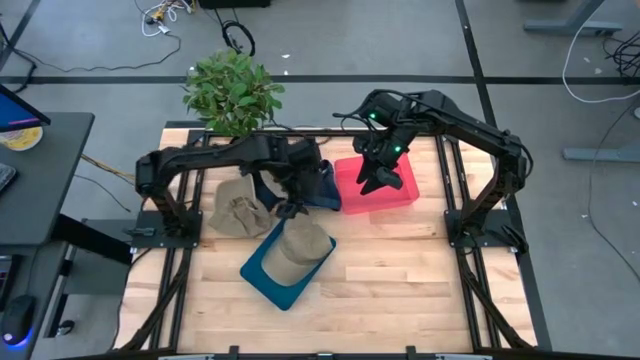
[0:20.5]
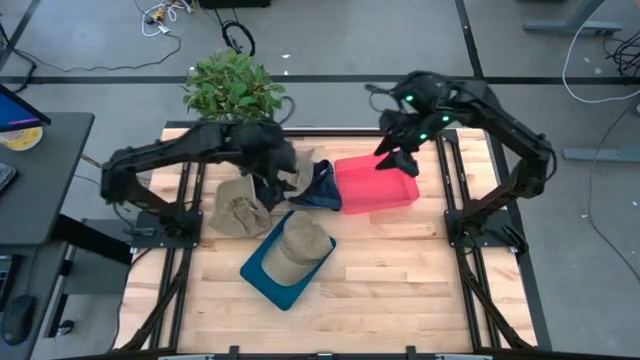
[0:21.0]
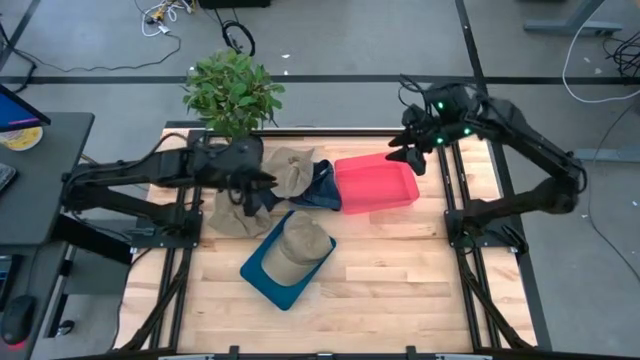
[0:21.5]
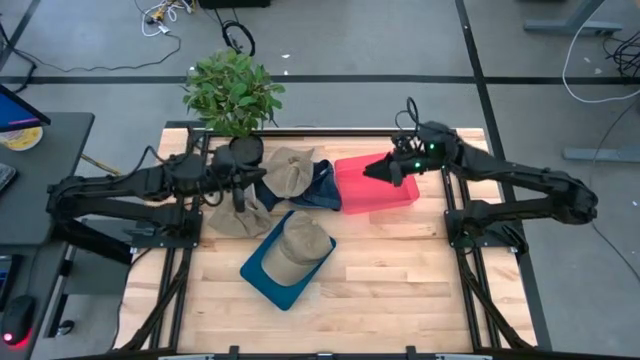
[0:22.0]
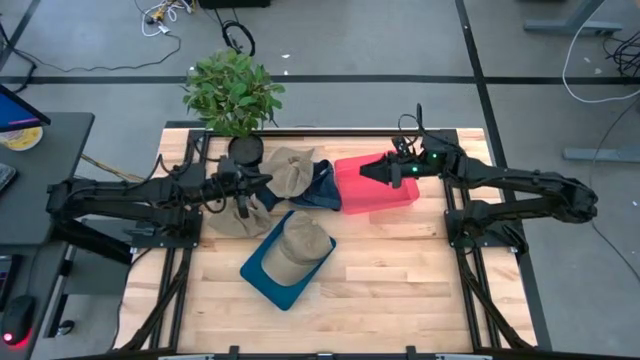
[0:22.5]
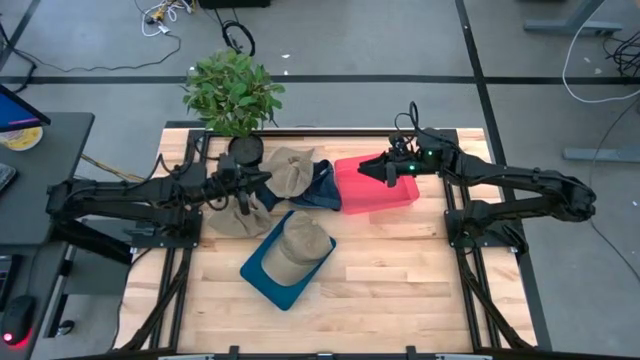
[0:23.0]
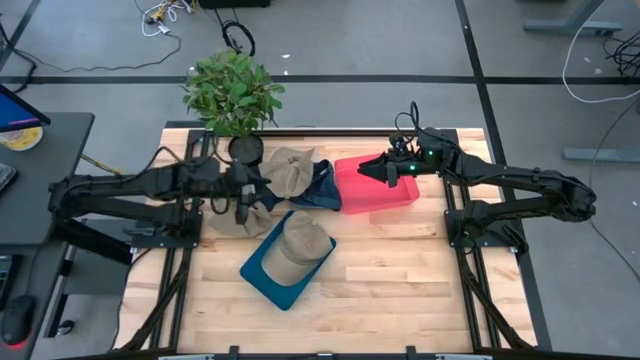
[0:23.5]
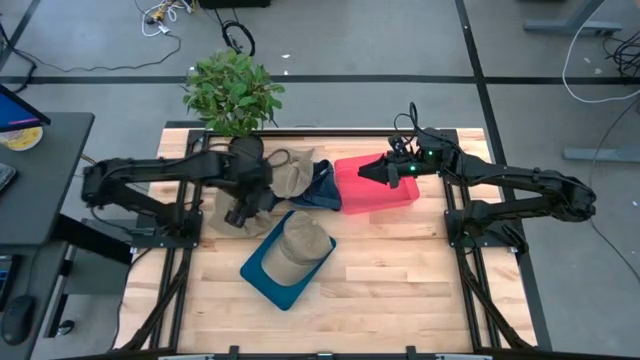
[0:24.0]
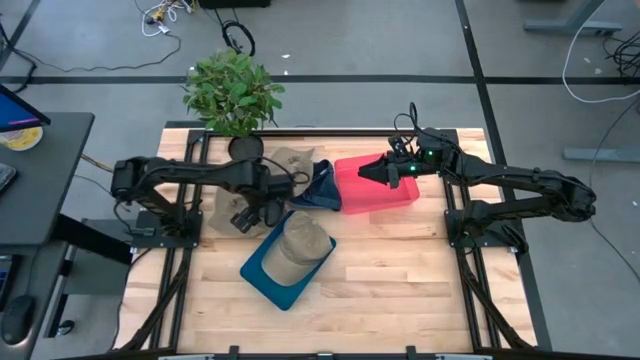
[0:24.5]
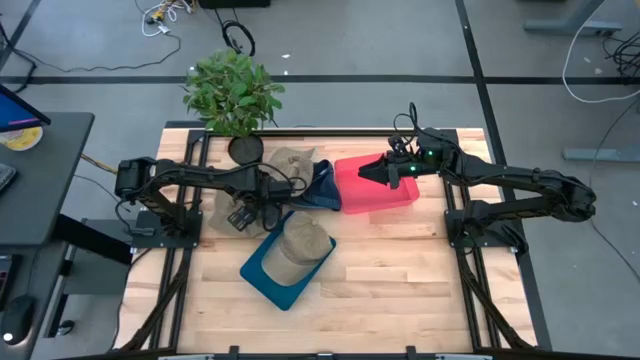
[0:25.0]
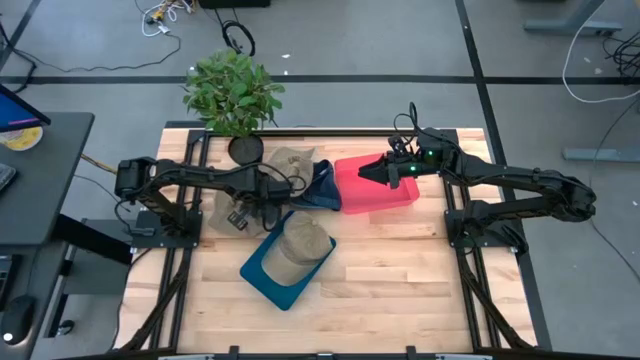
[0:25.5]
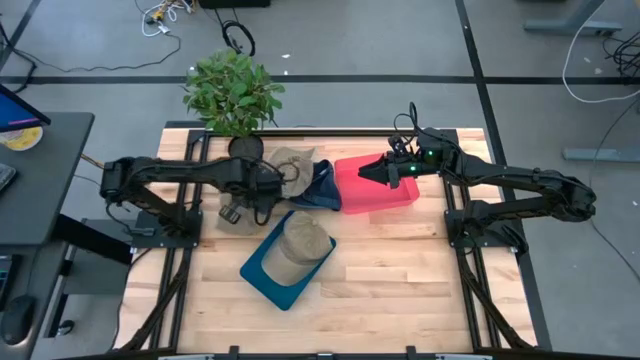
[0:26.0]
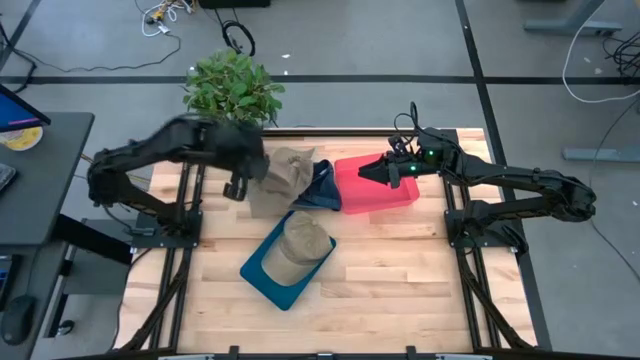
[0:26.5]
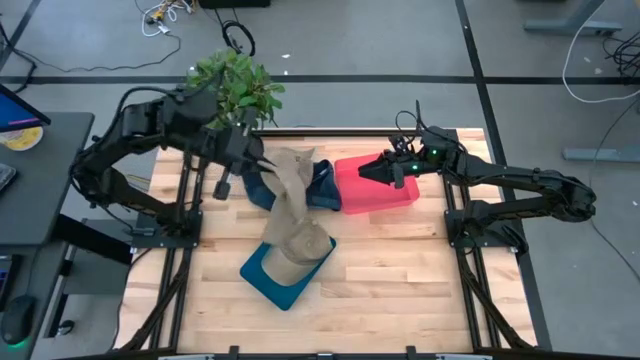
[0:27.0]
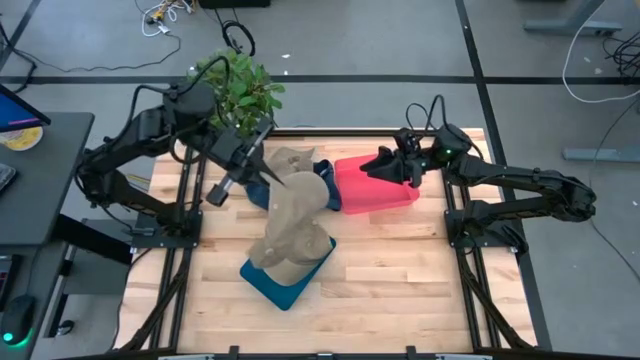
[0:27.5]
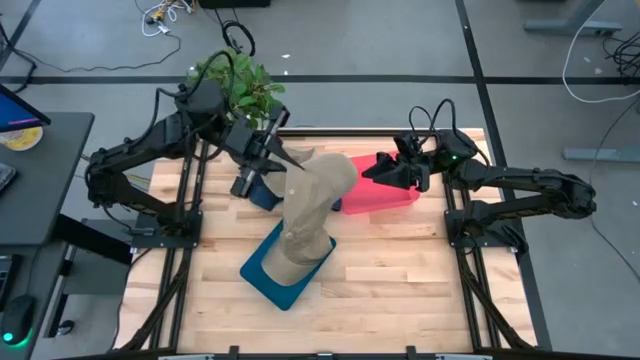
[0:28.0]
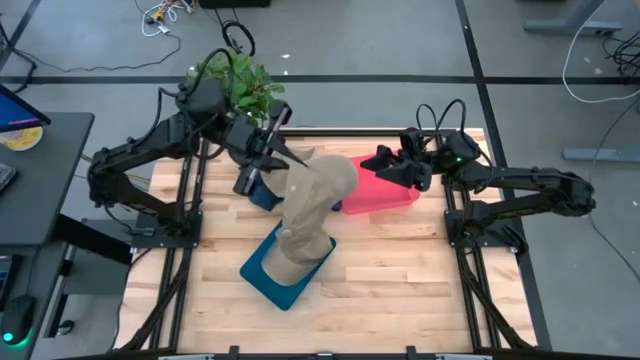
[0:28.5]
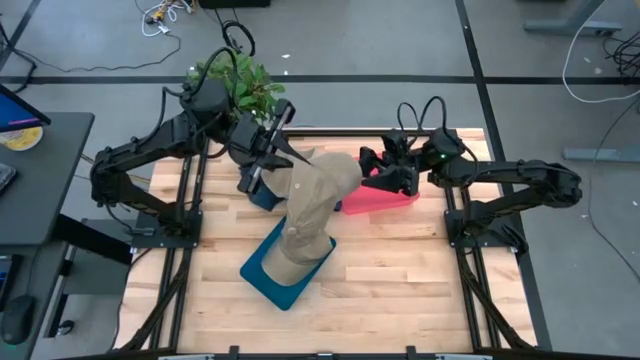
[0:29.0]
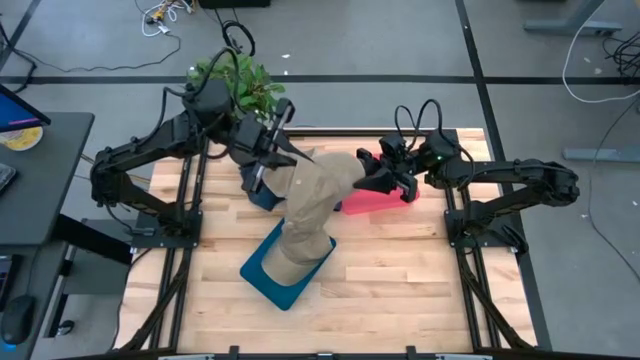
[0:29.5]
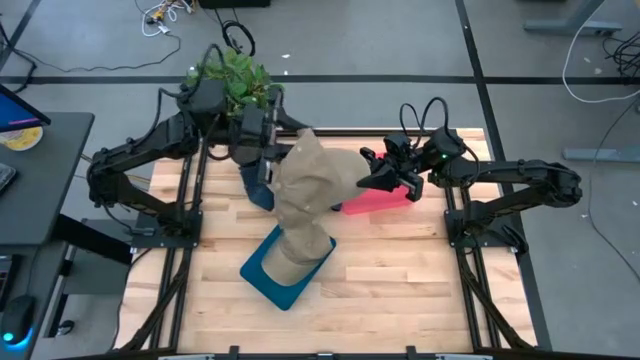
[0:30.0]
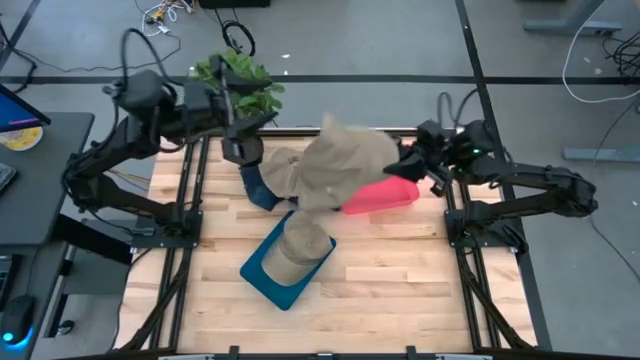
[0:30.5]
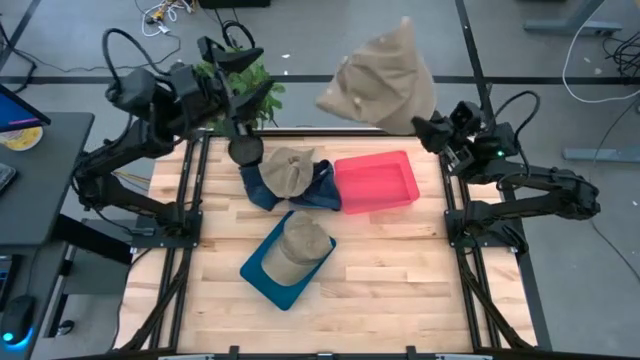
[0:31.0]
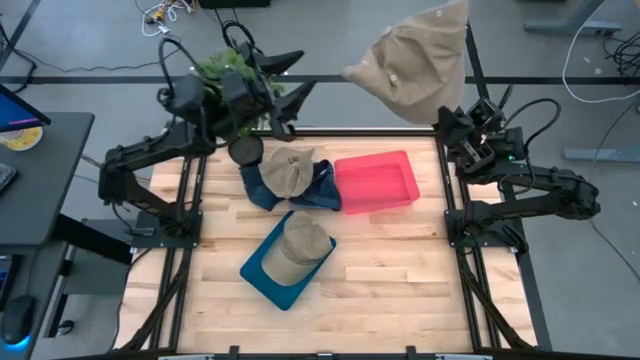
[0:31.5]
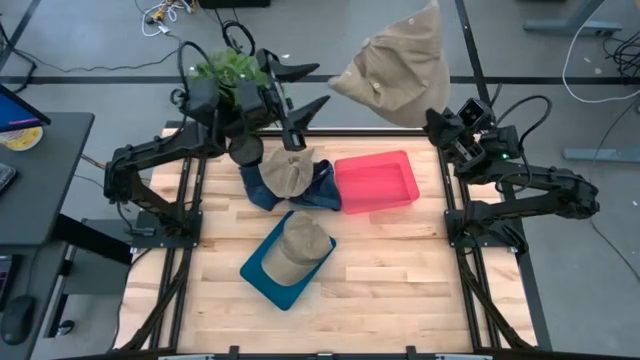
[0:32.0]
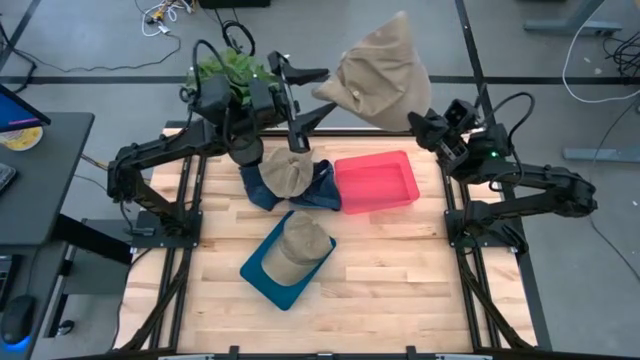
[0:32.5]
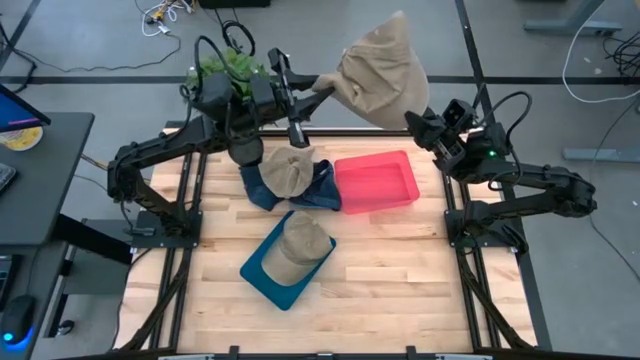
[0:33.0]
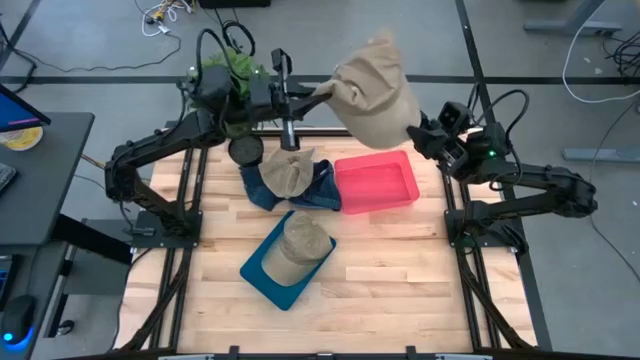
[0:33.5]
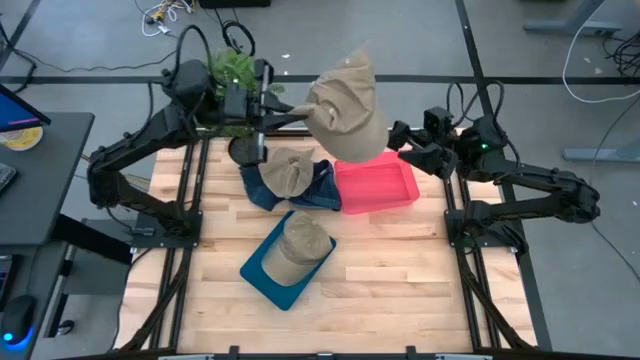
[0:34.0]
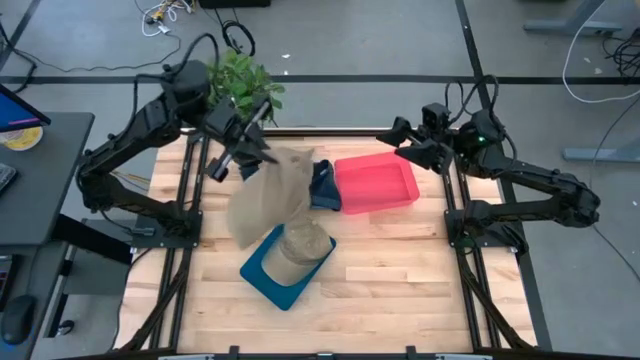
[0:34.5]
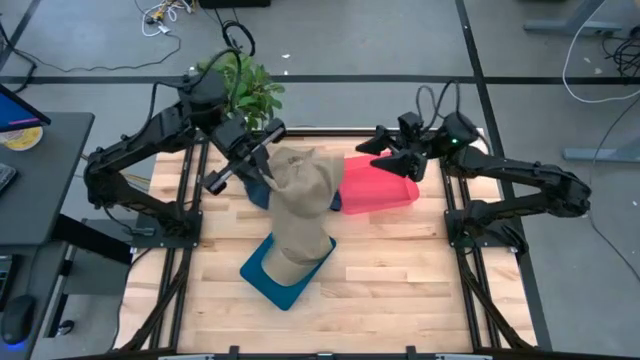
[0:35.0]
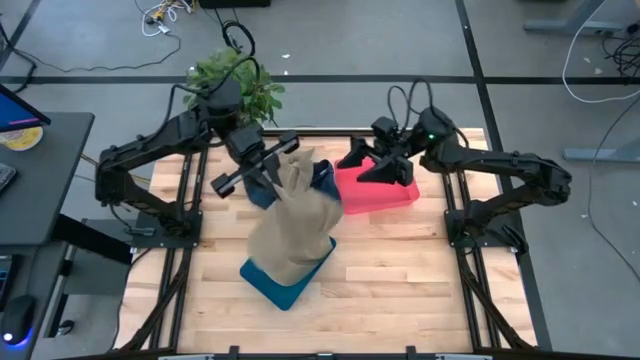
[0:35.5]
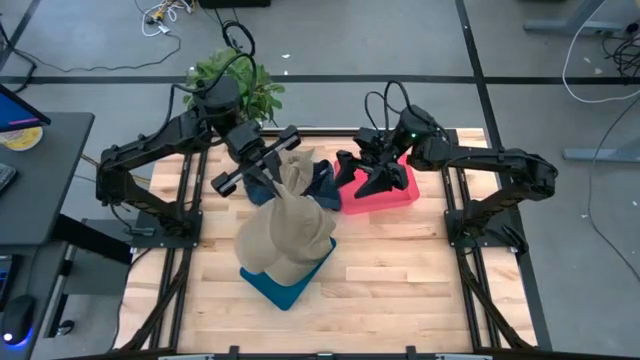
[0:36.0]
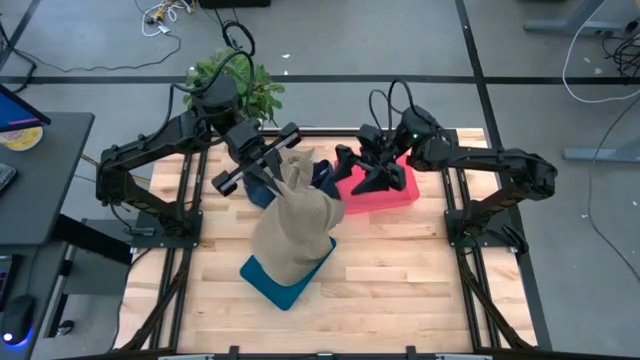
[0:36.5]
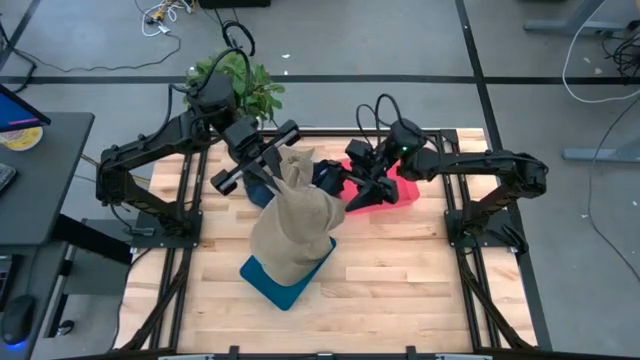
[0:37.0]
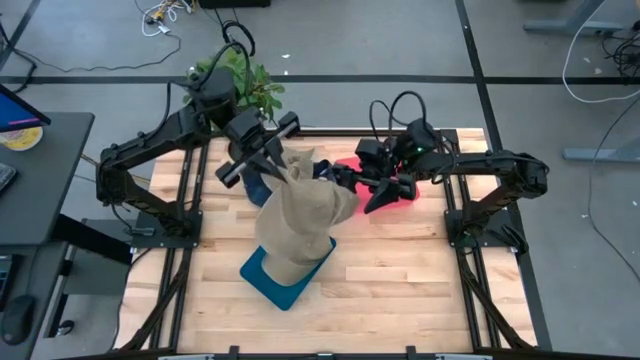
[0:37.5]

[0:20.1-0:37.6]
Task: Pick & Place hat
Put the left brown cap into the blue bin

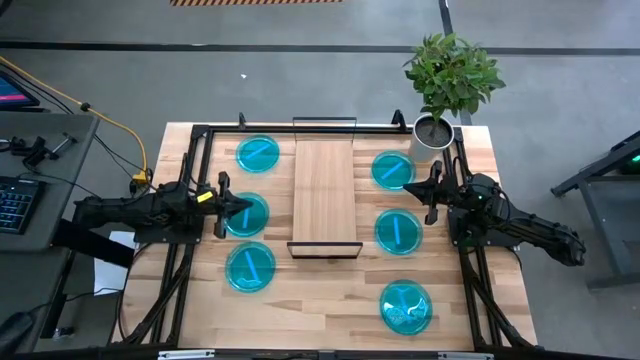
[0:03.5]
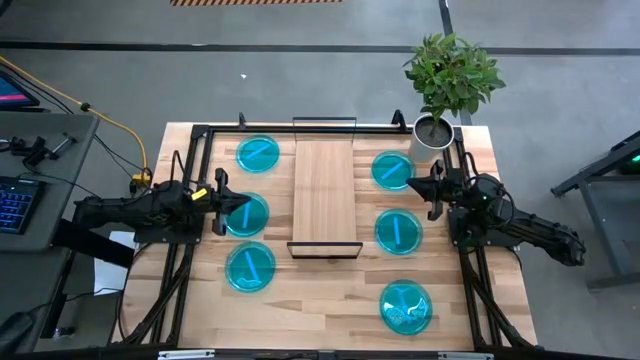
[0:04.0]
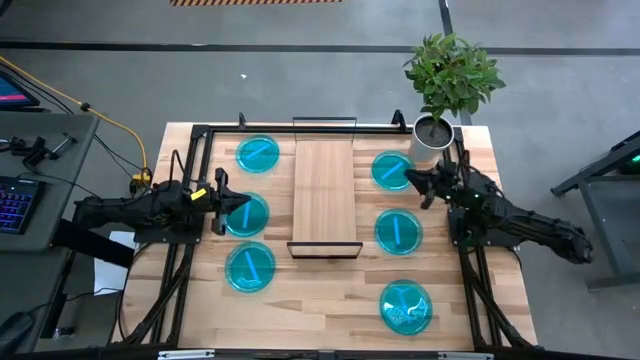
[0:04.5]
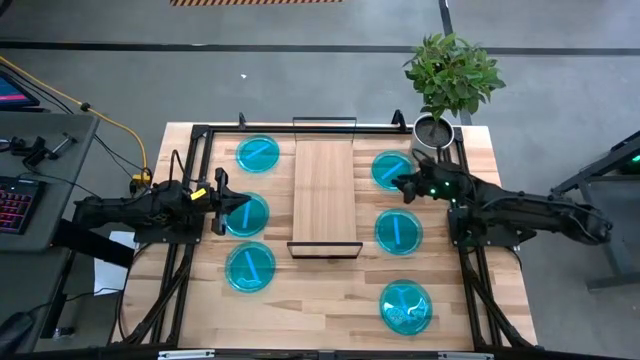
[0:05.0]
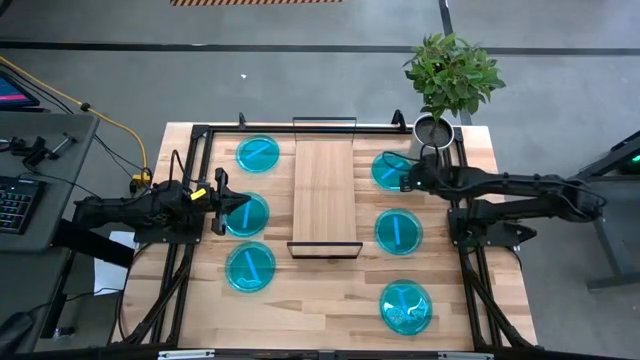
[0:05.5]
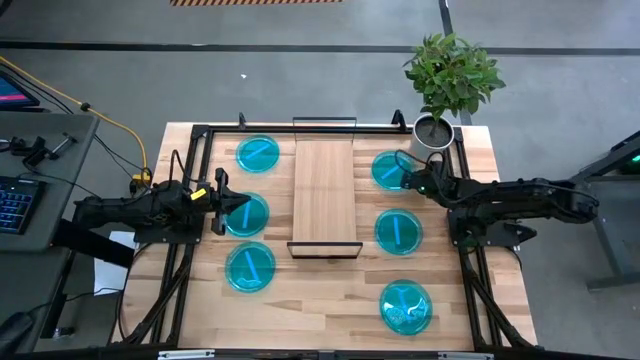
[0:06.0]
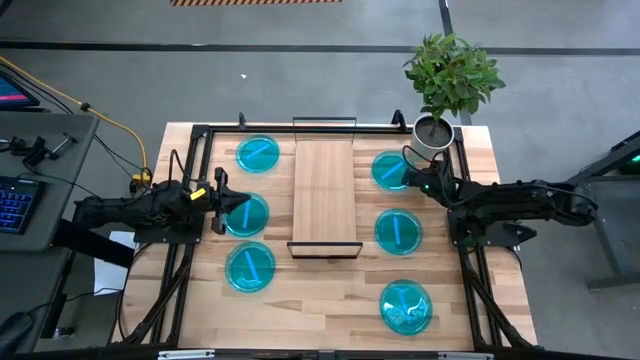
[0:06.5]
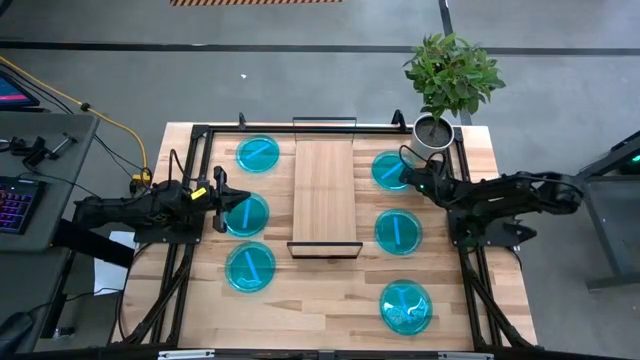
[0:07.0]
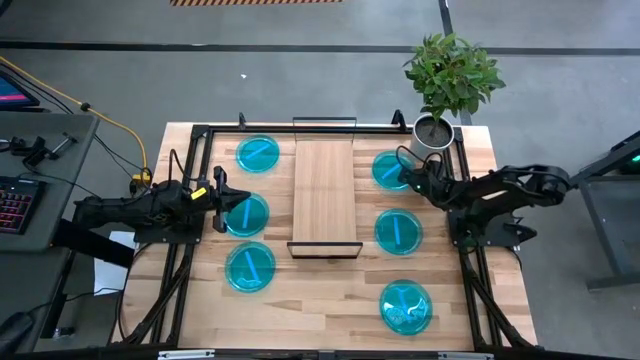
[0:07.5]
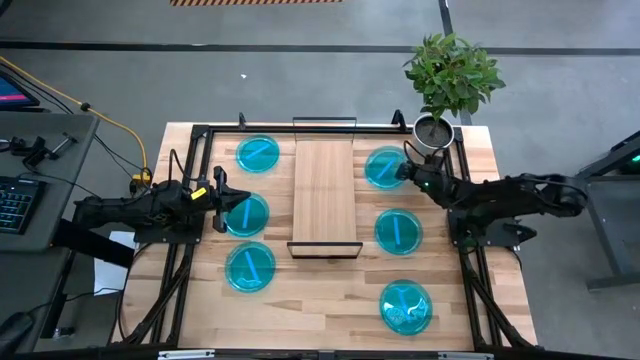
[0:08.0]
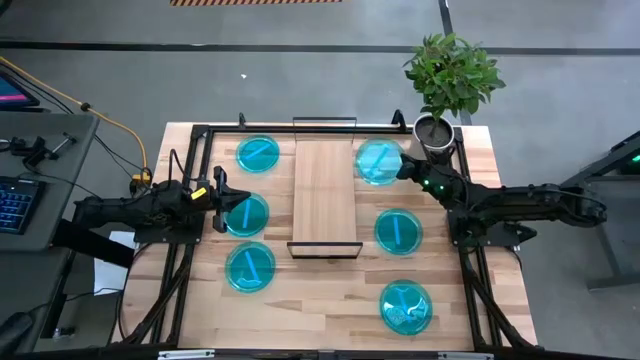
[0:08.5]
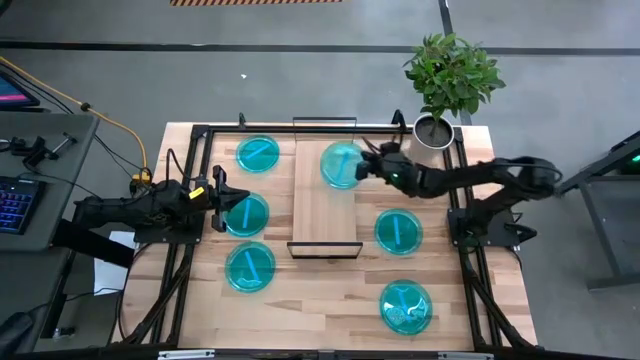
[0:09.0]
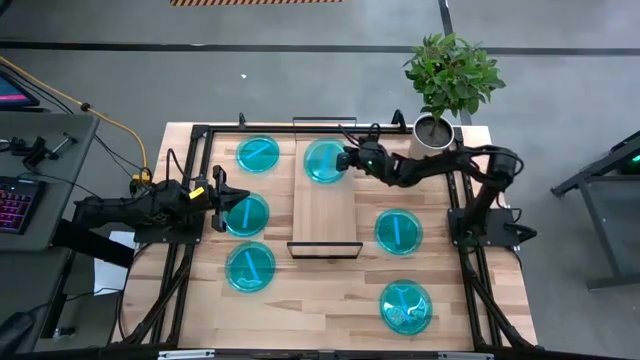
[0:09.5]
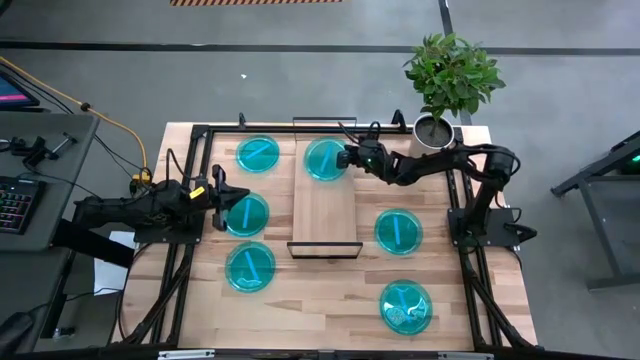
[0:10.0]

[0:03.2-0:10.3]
Task: Place and stack plates onto a shelf
Put the blue plate on the shelf
